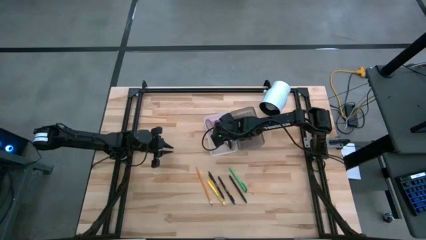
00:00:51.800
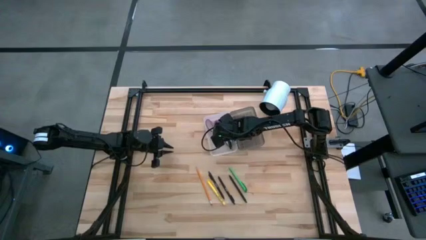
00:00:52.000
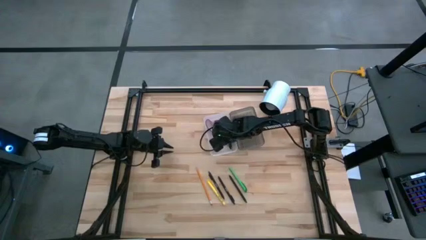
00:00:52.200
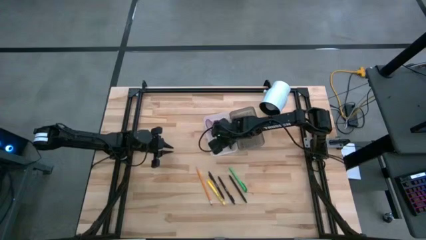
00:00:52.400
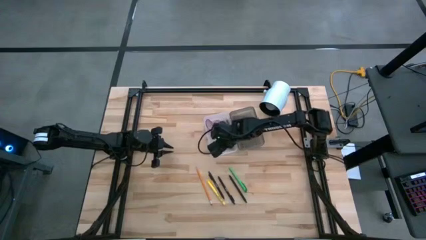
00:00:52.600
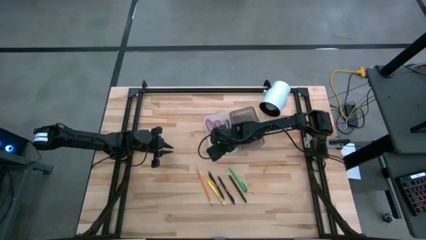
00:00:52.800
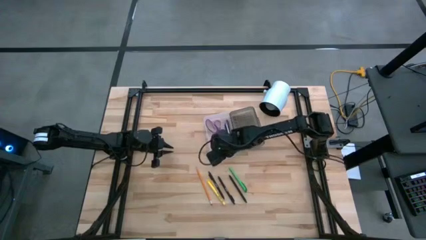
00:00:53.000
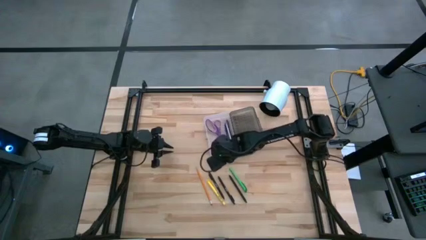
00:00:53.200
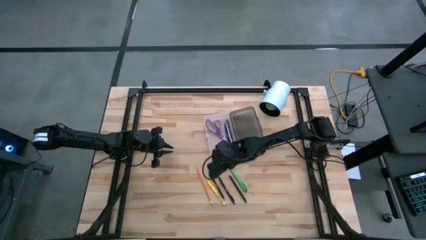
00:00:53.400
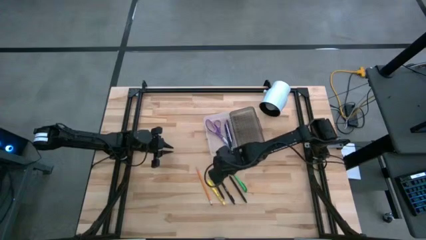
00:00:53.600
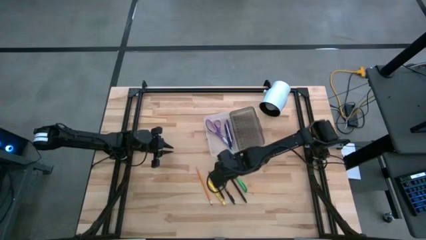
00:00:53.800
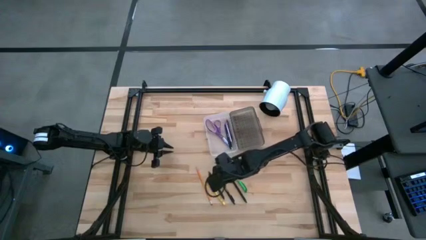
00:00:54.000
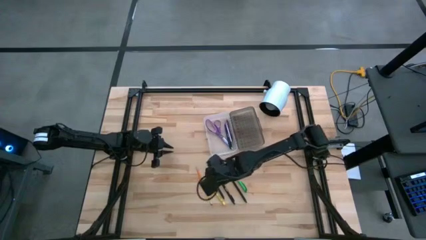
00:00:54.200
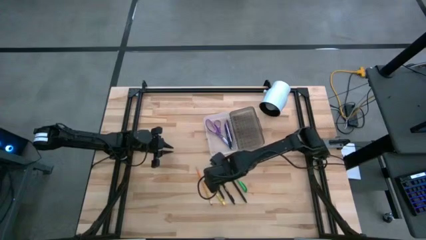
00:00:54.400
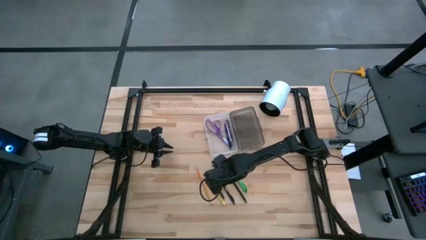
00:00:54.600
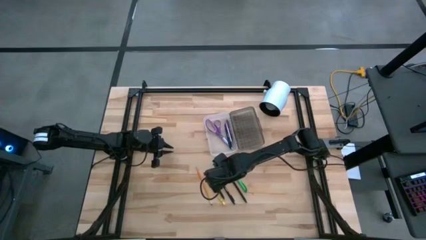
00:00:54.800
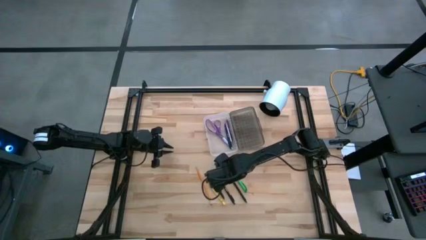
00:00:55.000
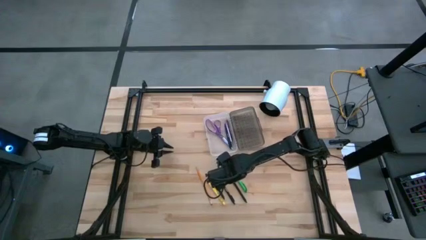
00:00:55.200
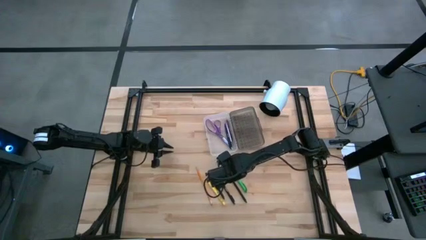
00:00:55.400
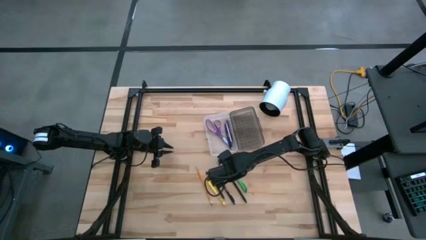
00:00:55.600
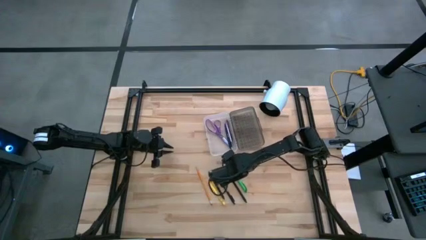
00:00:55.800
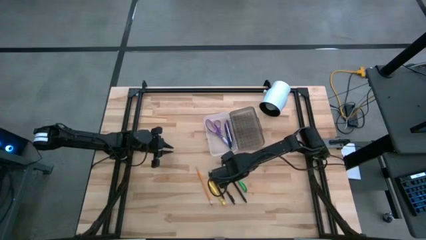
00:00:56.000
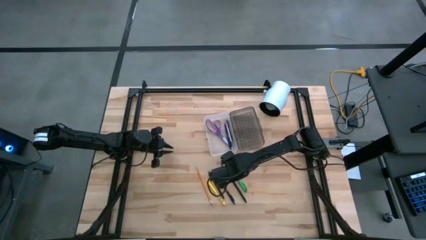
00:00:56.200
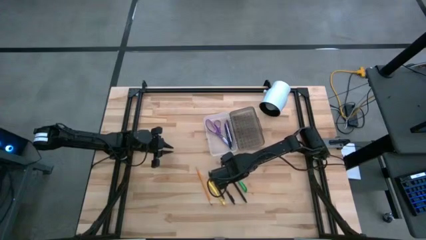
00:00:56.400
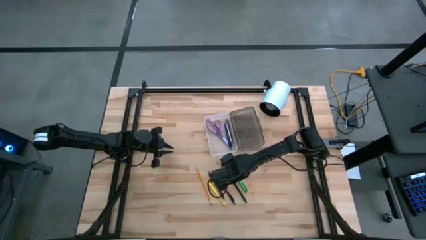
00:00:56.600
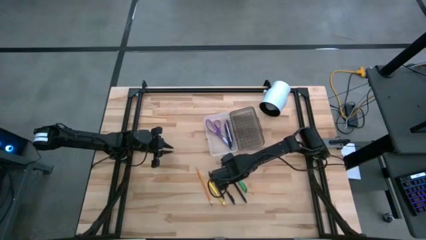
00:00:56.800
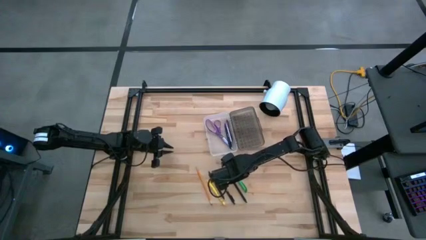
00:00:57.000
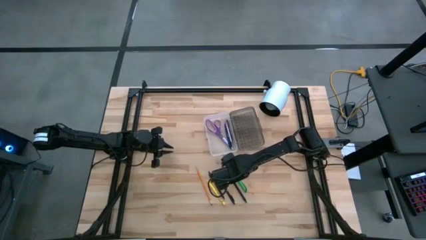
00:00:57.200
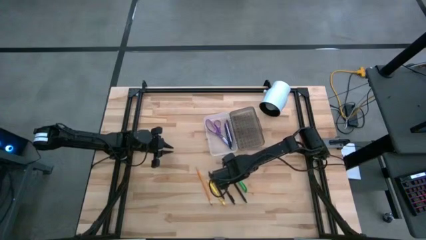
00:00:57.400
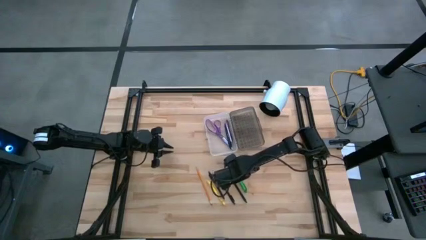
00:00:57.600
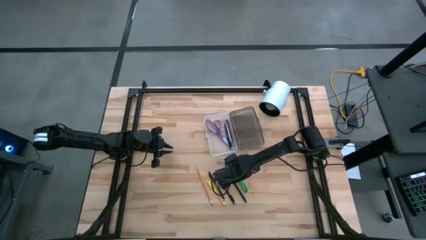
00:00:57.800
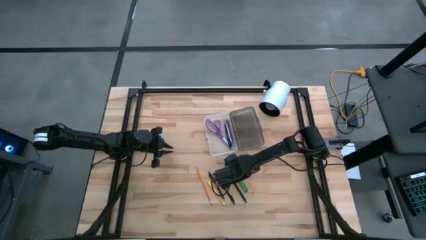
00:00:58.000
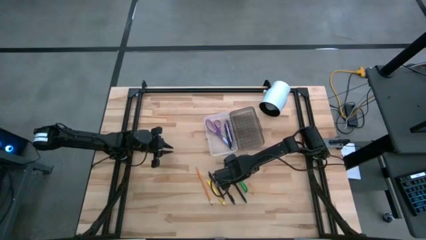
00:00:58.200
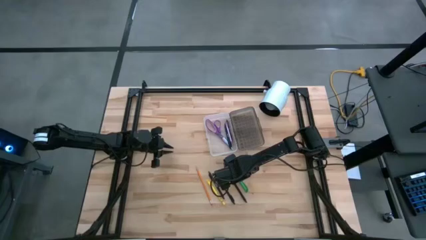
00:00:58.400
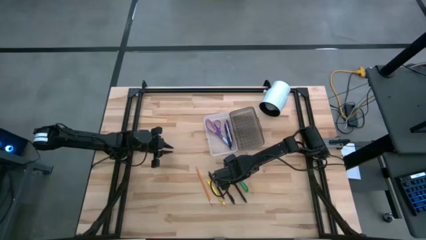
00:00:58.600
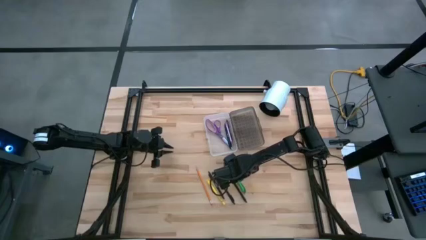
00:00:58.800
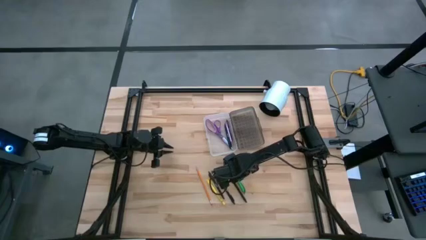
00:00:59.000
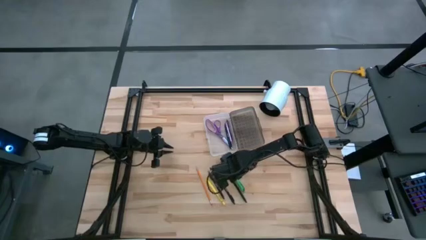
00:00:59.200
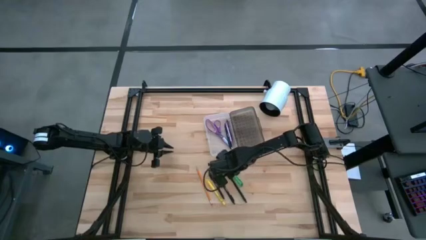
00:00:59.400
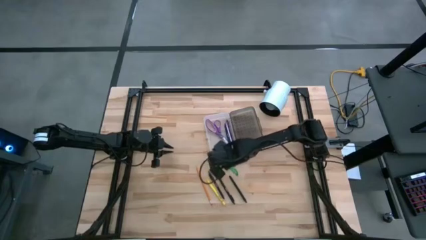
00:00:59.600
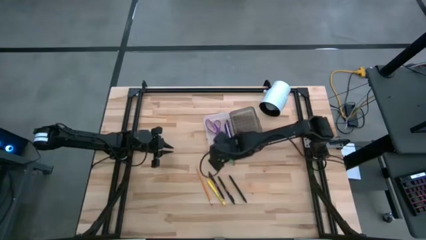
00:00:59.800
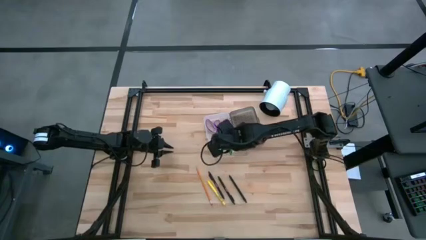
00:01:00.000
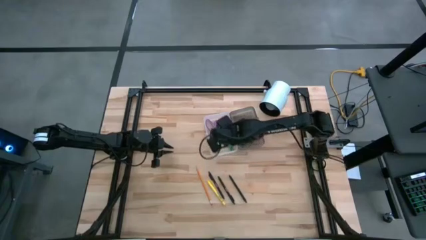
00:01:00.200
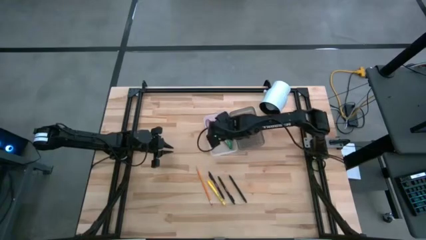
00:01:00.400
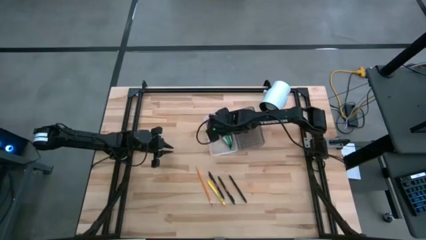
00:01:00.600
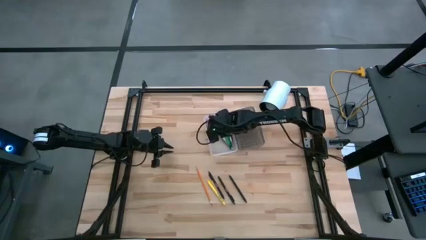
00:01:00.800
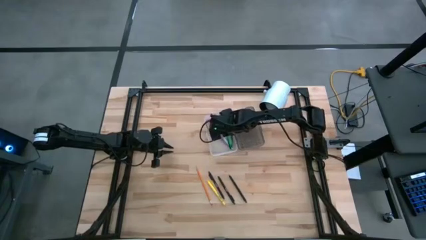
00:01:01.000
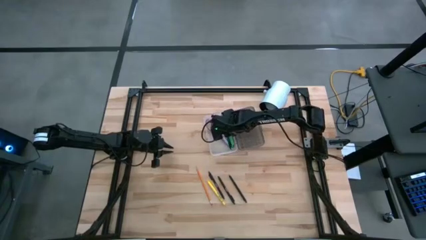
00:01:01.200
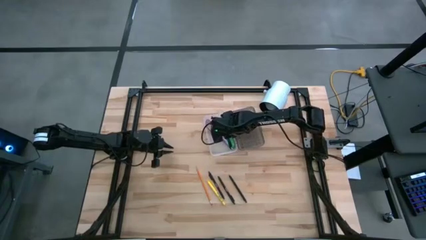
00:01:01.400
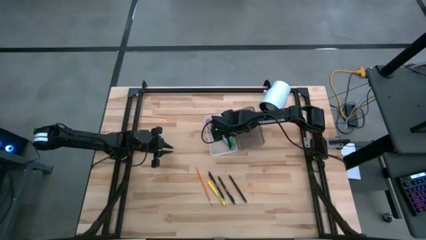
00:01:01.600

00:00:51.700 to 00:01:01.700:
Task: Pick & place school supplies into a supply box
Put the green pen into the supply box

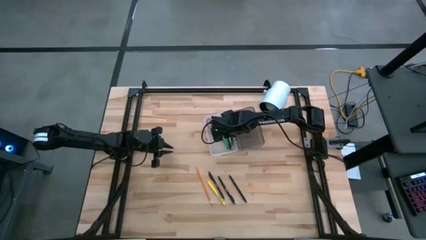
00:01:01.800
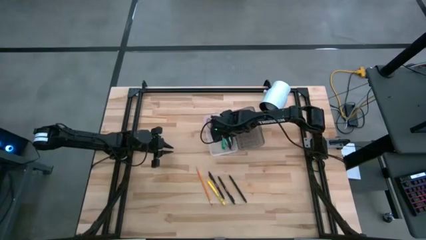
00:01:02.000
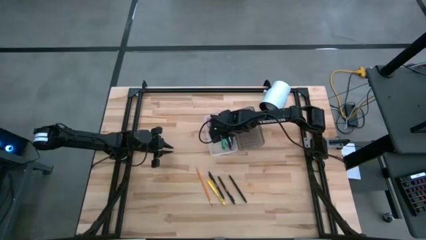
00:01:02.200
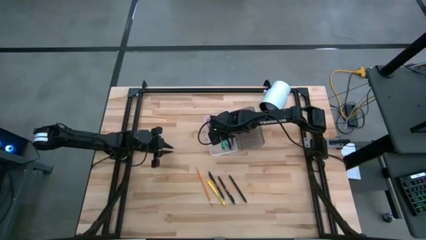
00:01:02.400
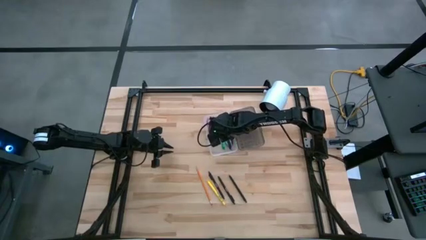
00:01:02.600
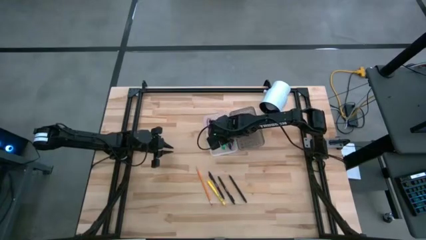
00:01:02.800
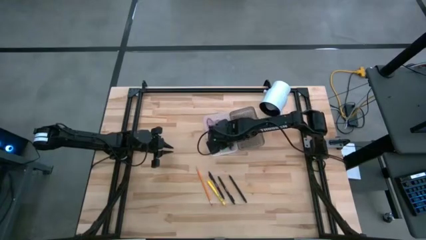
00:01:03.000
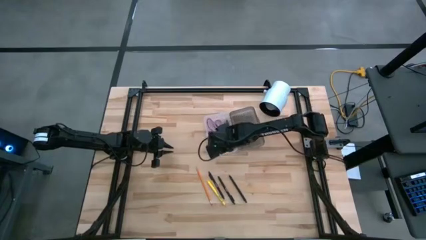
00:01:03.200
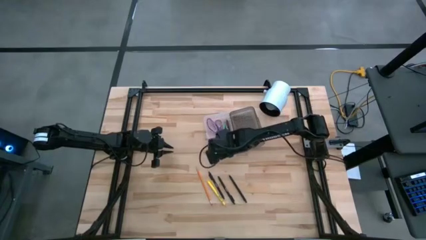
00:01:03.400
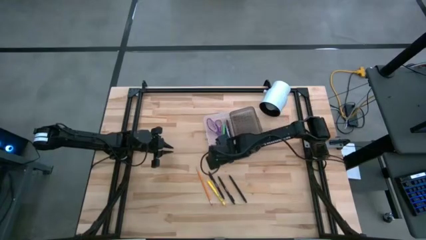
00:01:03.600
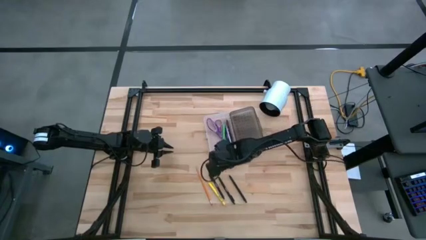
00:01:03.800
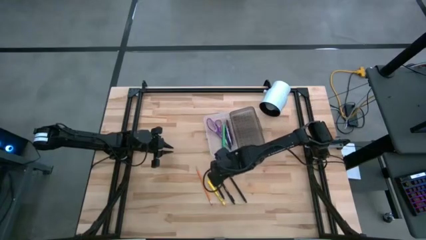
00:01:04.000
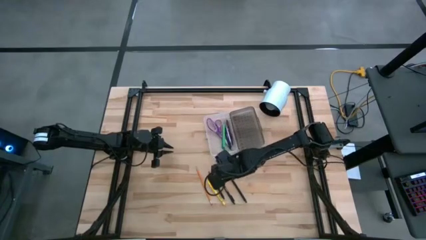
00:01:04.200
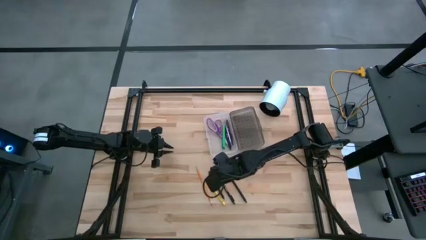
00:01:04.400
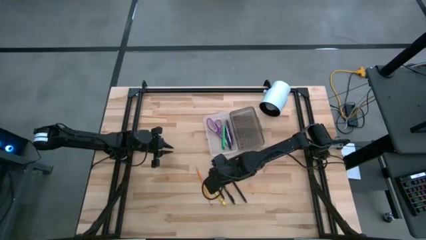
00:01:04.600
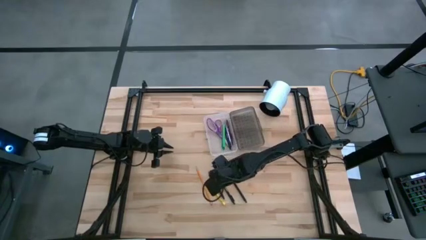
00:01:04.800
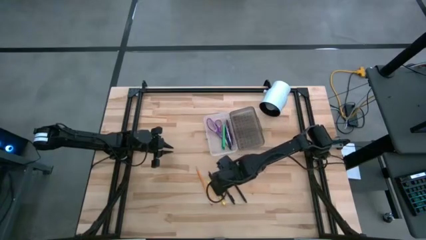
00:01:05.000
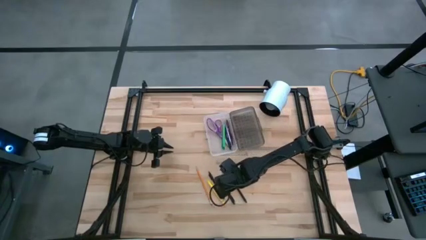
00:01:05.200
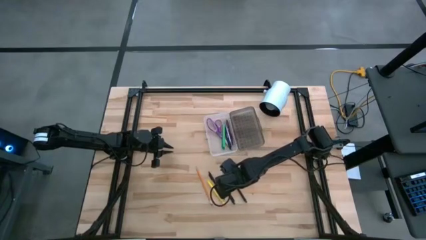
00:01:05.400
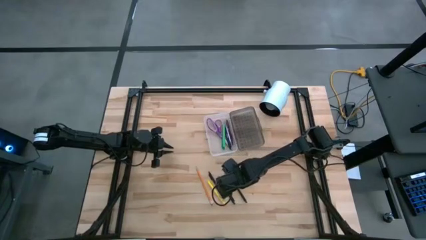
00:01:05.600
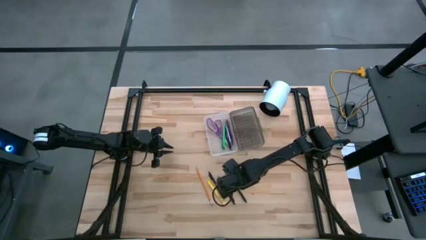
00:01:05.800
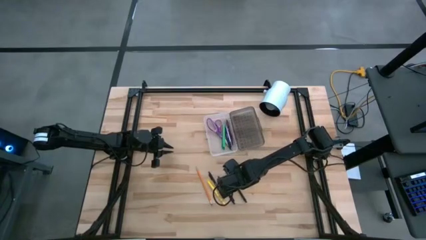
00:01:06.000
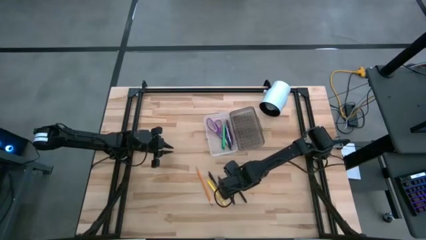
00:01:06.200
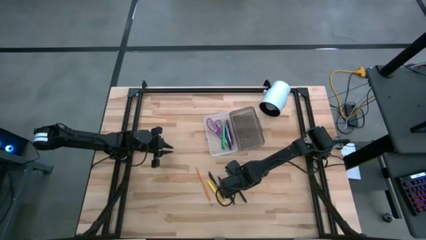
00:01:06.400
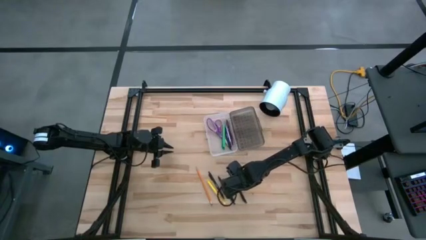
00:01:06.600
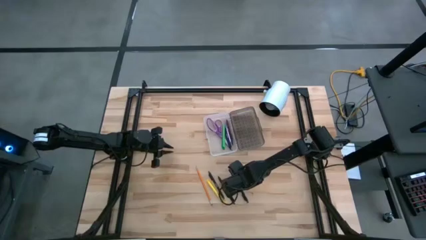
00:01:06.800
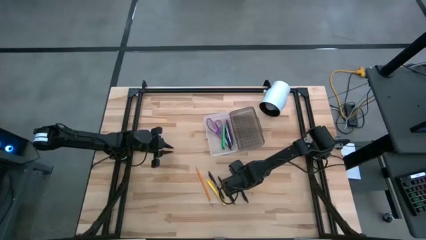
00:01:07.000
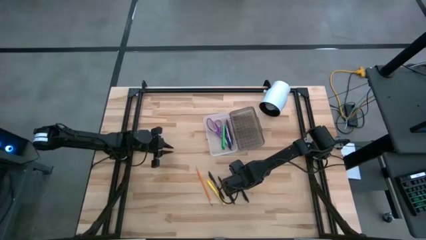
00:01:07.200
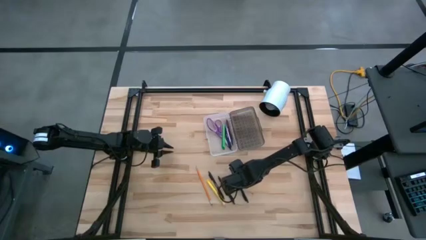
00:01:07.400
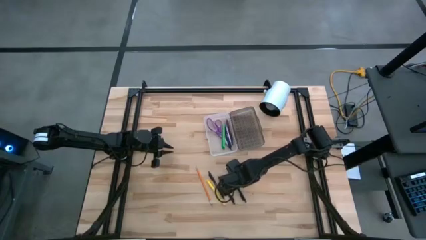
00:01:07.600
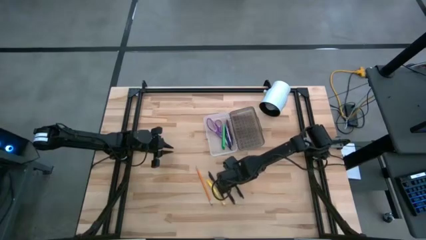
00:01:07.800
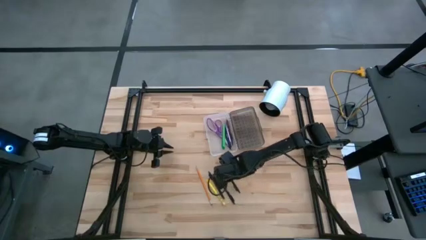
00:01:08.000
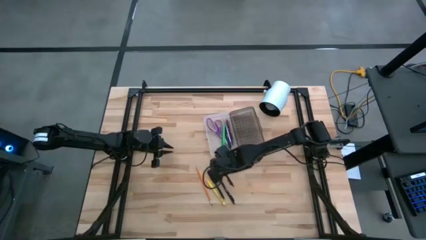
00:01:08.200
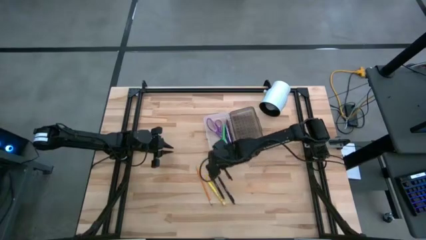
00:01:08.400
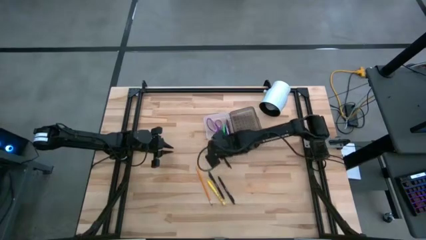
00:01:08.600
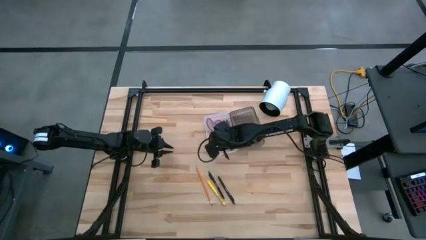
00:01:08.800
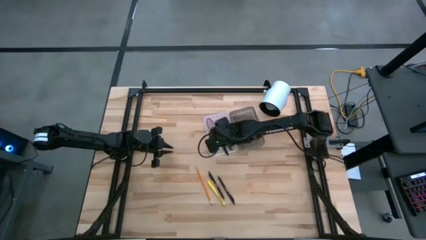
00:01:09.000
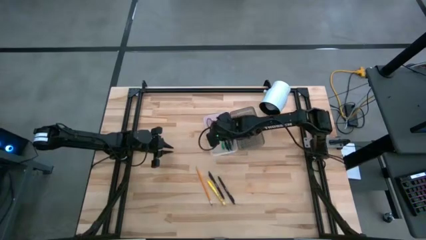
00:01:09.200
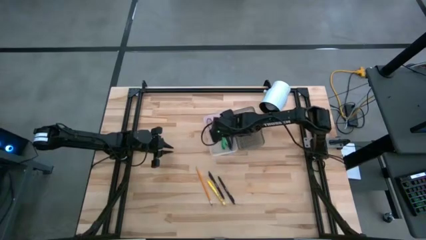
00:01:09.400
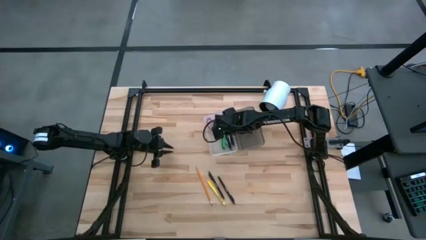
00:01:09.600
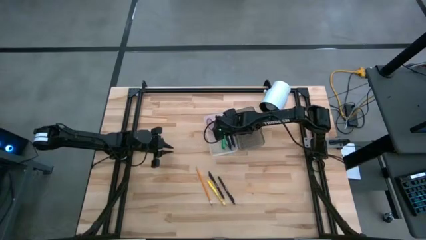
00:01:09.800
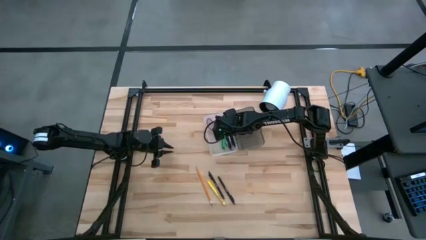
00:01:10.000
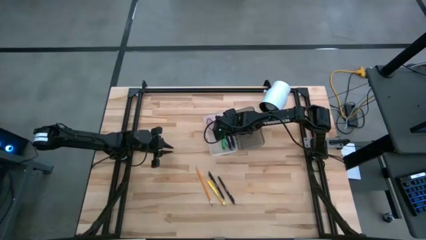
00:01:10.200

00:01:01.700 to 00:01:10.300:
Put the right black pen into the supply box
